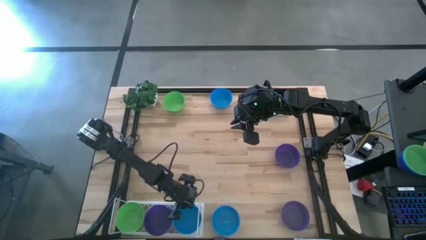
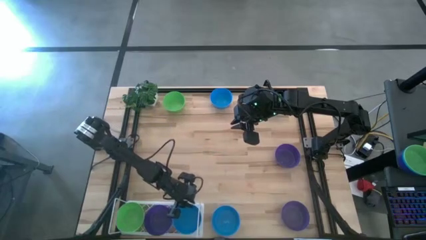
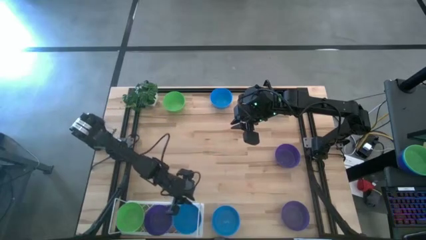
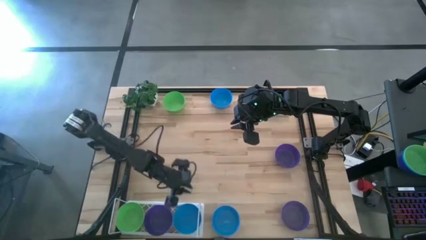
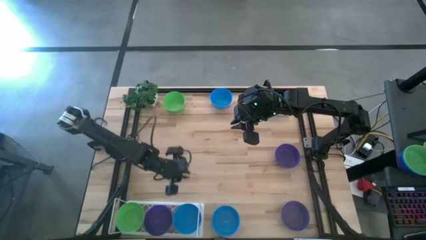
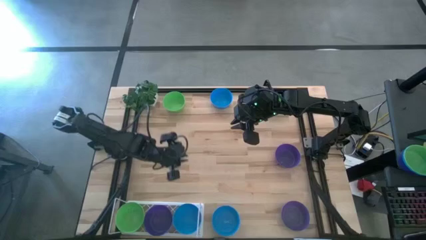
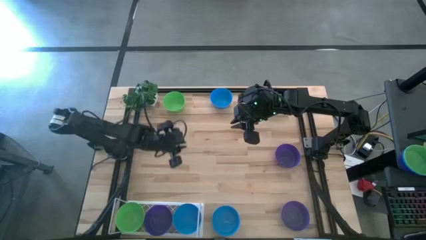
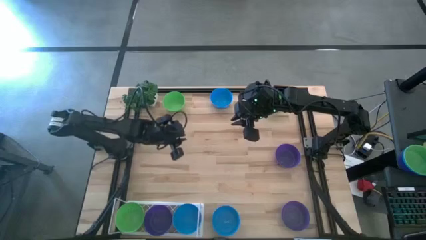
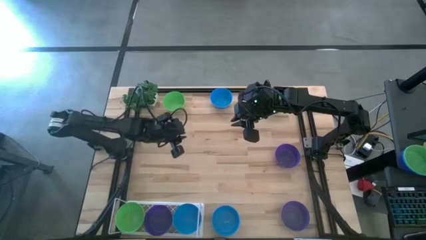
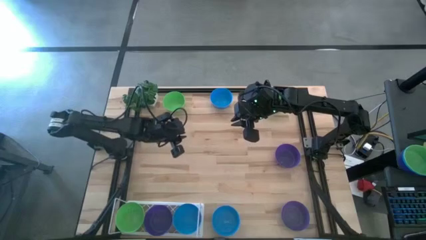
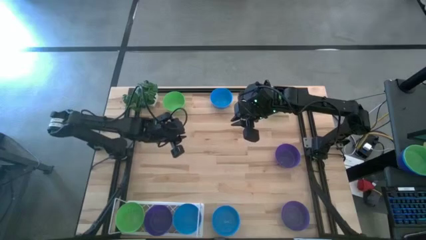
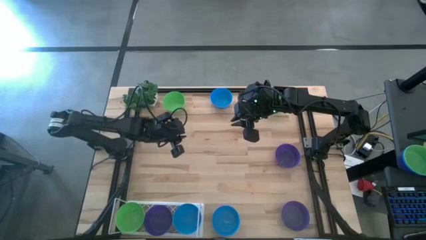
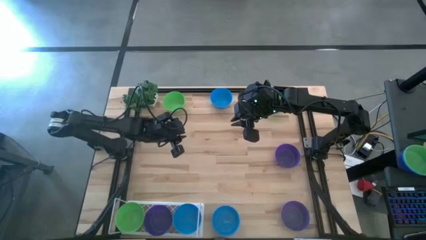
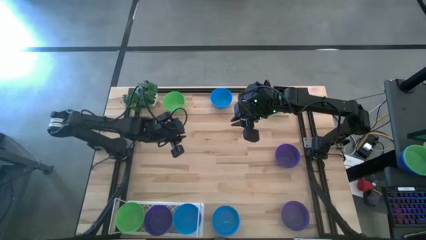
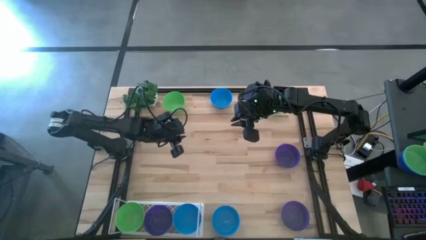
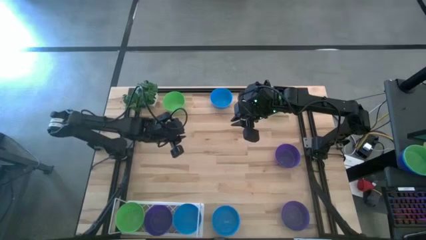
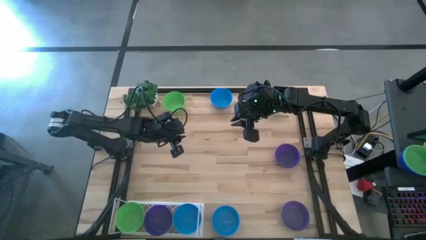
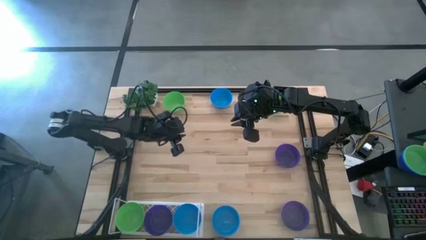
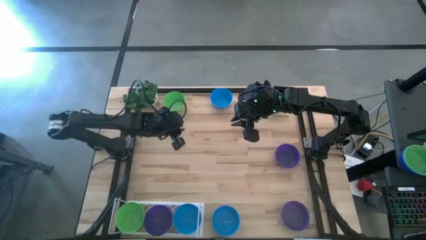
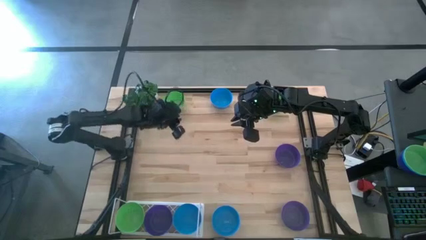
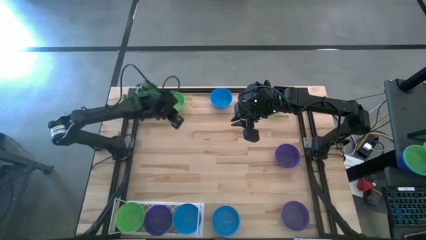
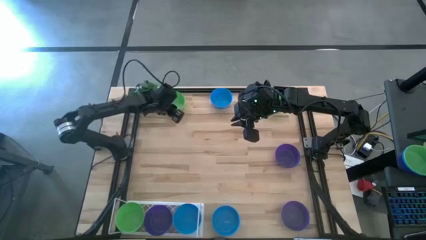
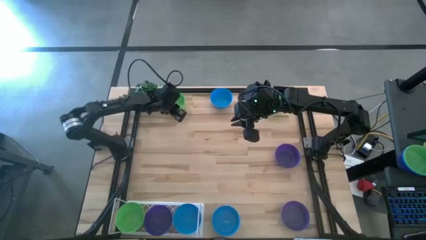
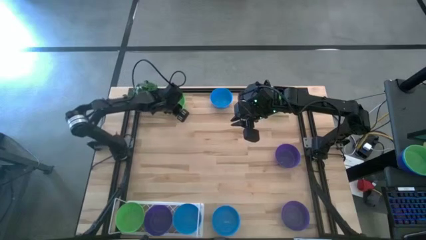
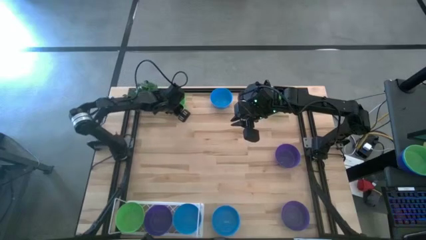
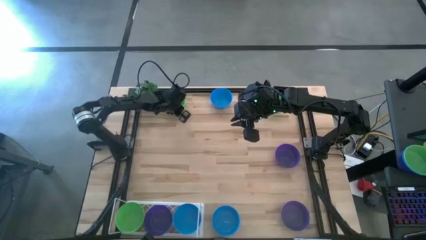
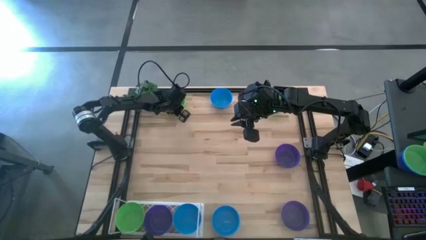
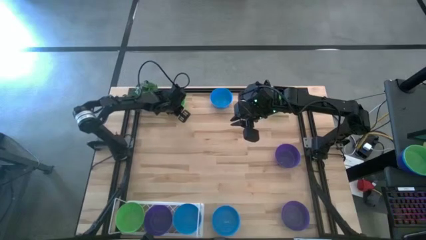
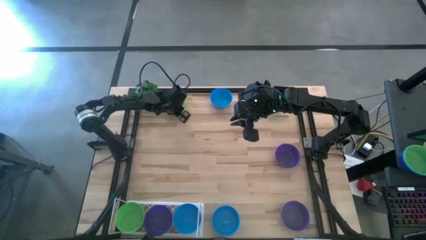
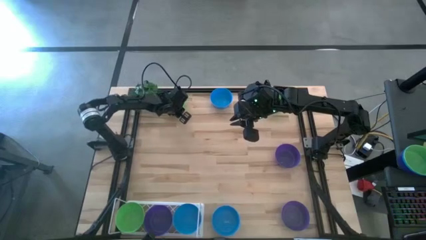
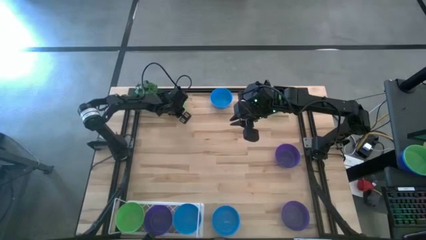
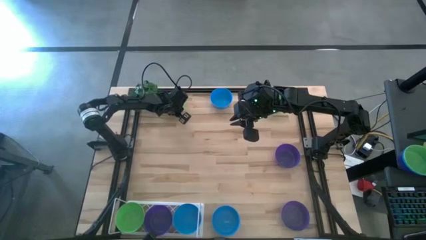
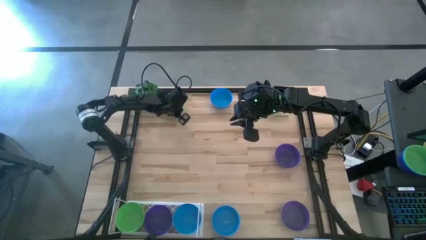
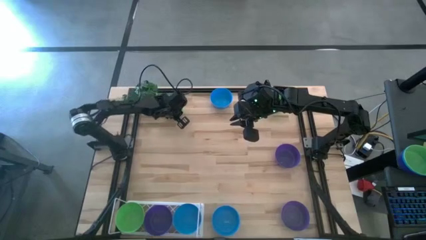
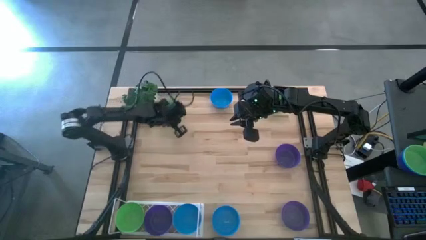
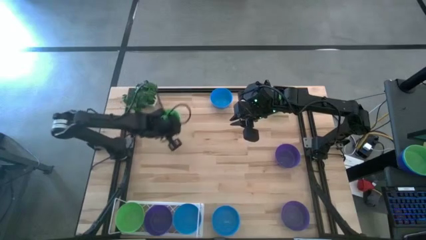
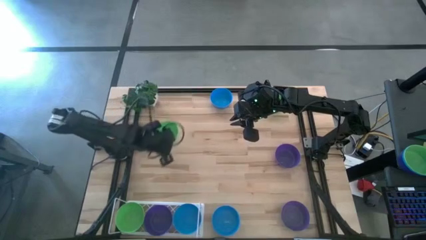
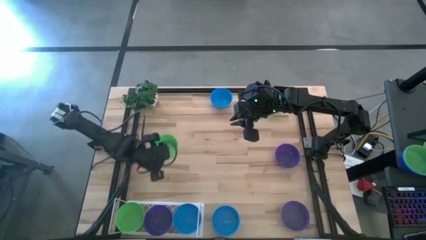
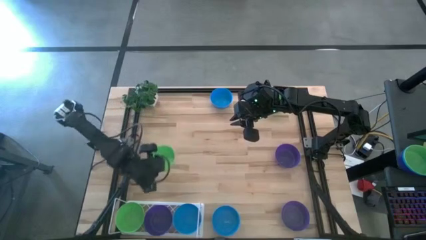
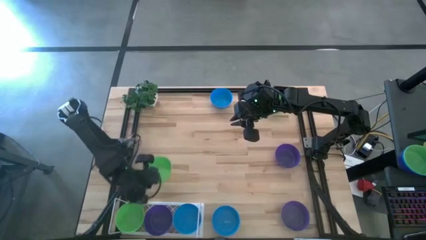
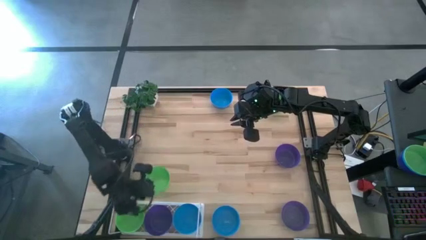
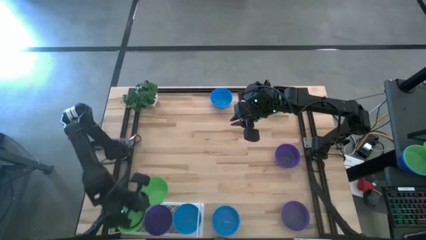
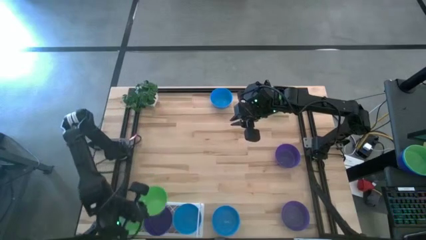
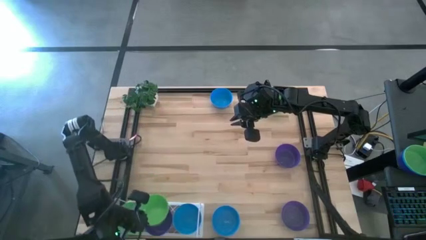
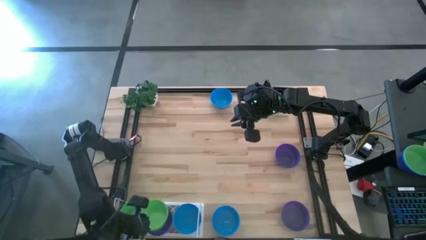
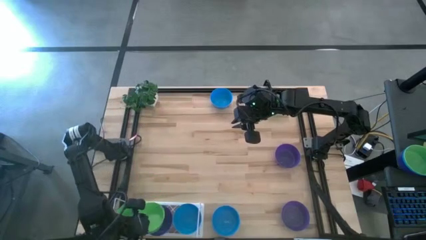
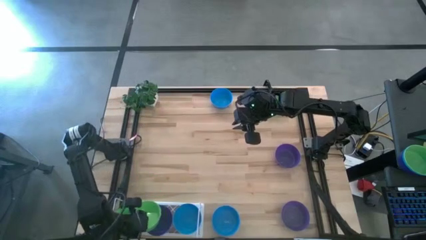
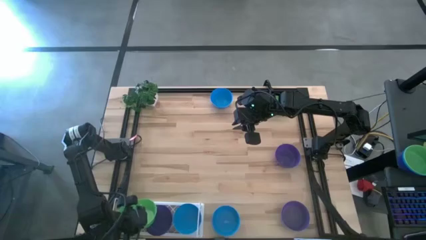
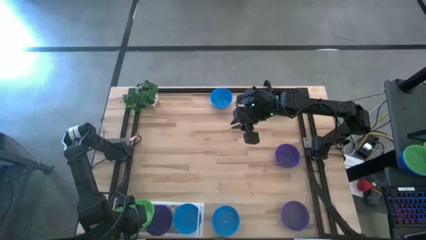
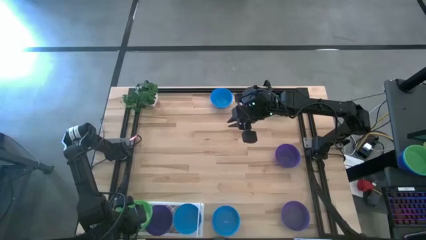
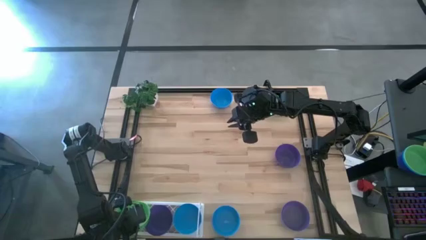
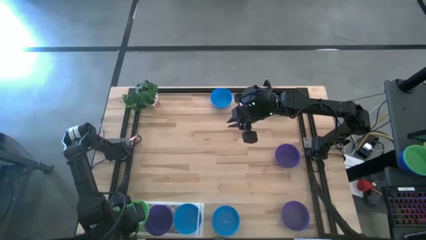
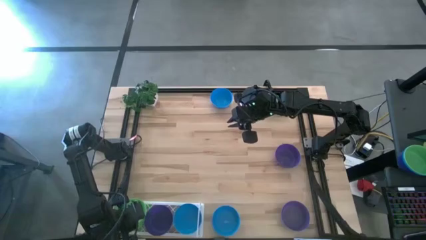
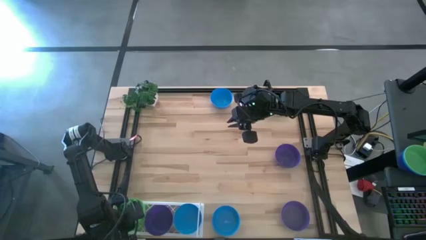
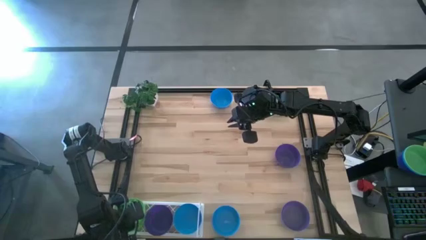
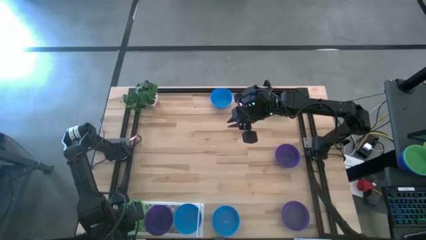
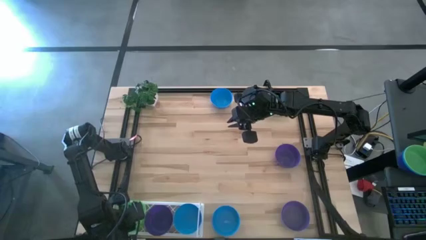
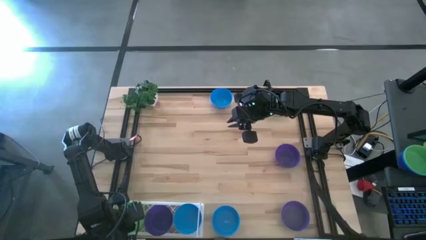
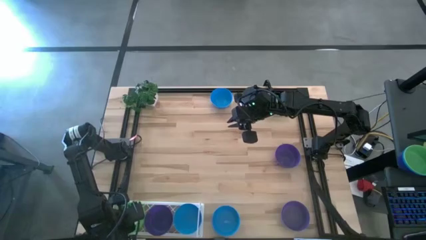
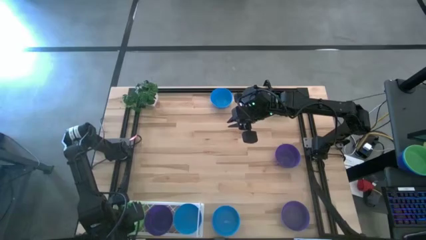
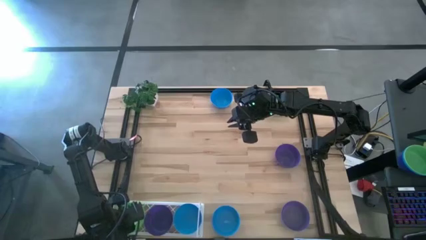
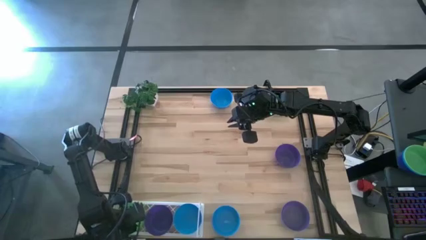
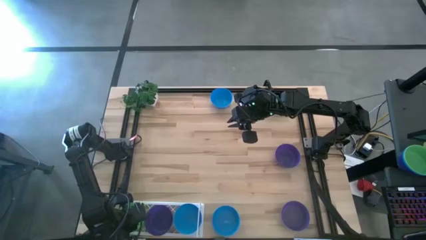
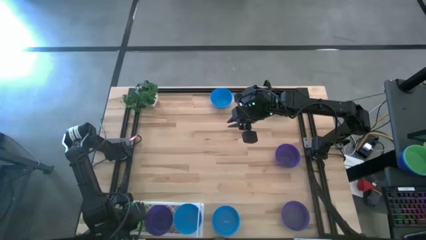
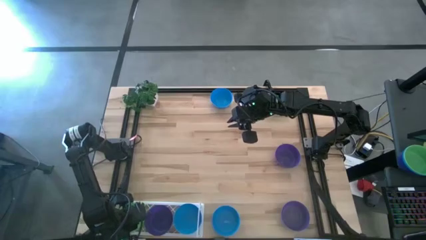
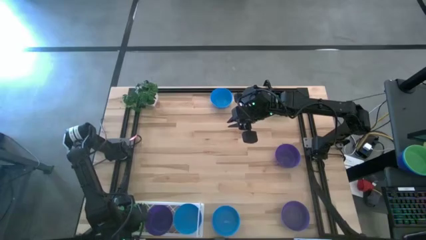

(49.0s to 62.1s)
Task: Pick & Place Mini bowls
Stack the left green bowl on the green bowl on the shelf
